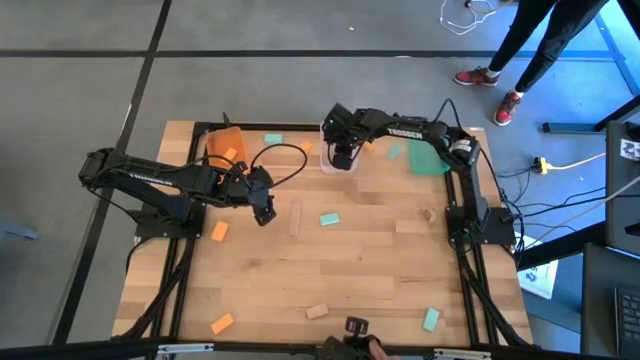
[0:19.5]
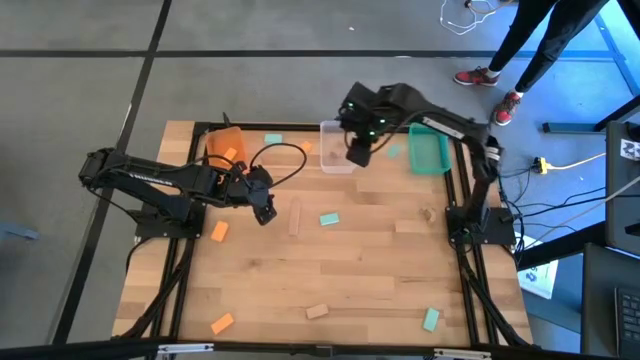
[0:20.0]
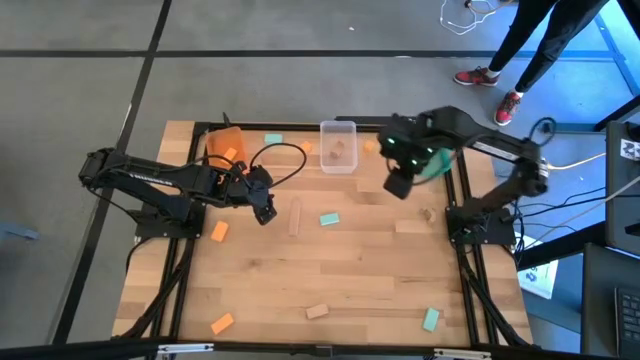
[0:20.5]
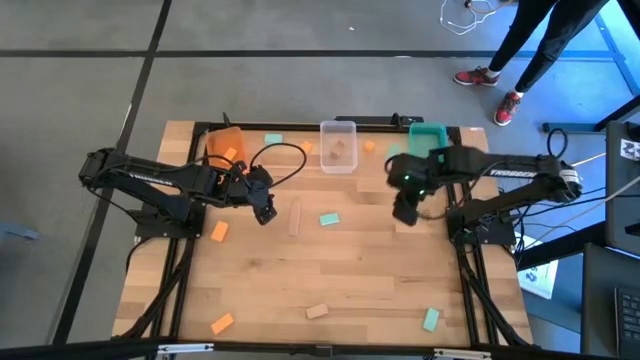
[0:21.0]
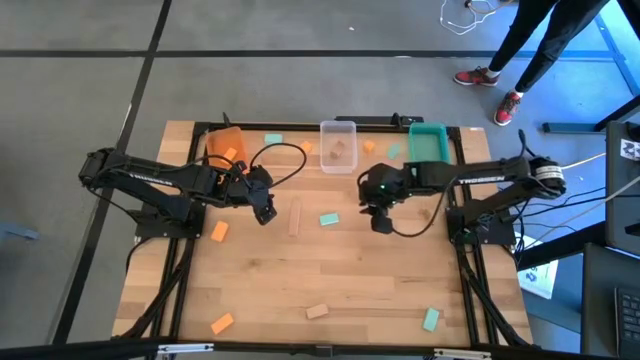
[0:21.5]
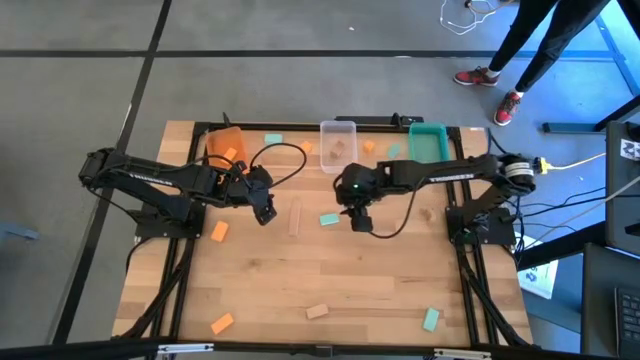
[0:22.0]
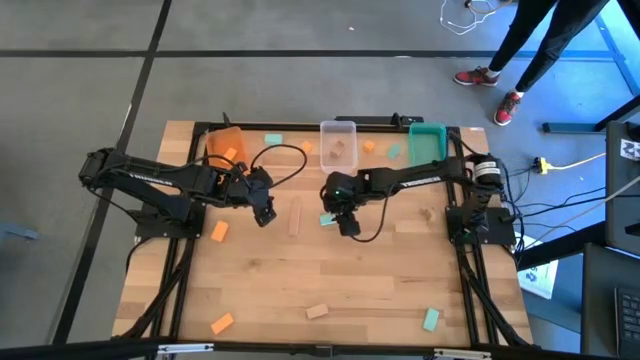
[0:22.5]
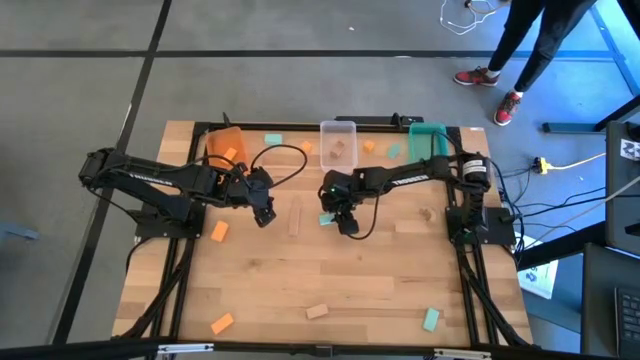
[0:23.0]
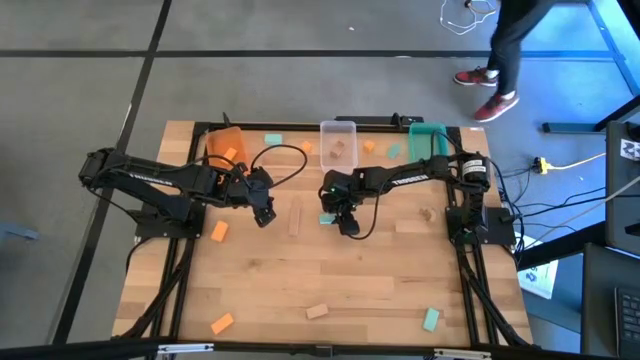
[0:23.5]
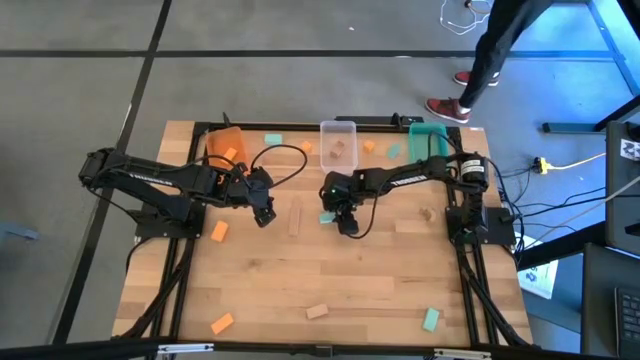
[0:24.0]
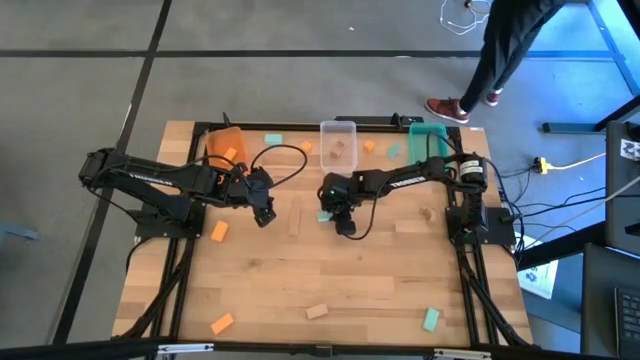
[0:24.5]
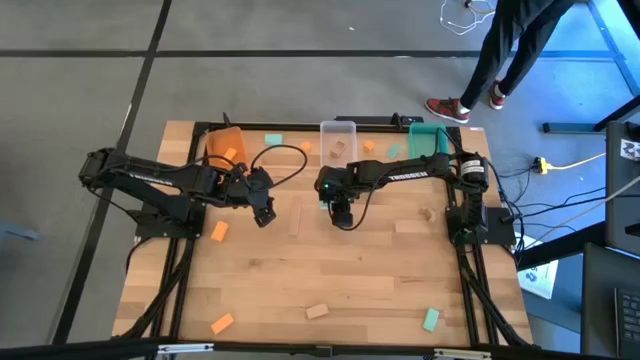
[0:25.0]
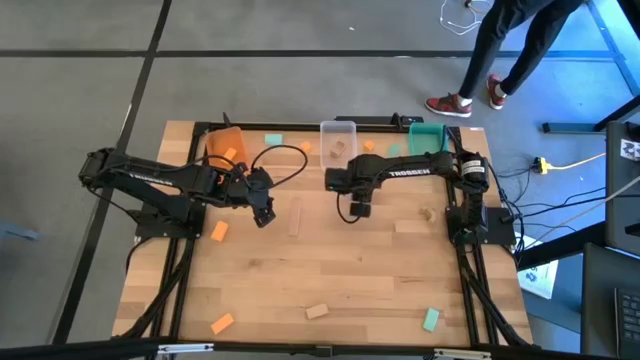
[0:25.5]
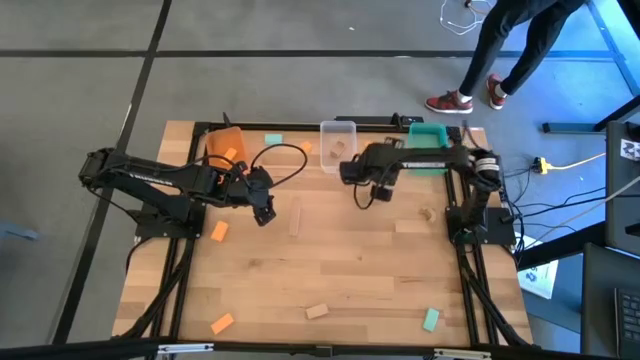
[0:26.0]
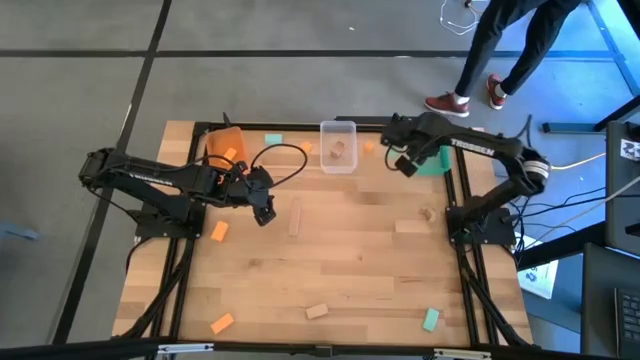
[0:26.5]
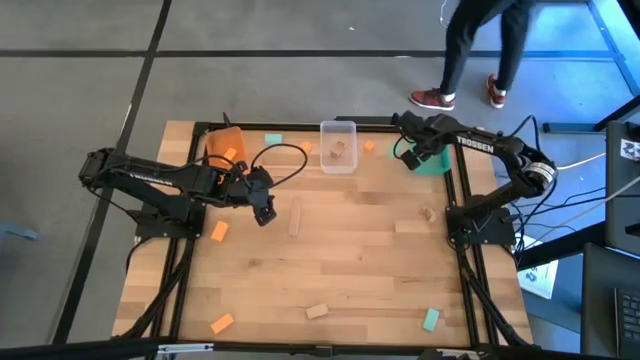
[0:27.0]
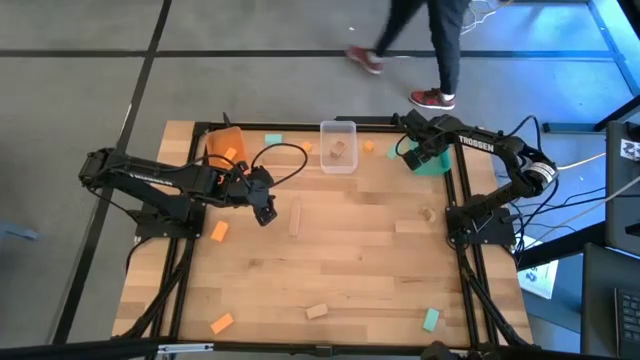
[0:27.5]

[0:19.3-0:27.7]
Task: Sort & place blocks by color
Put the green block into the green bin

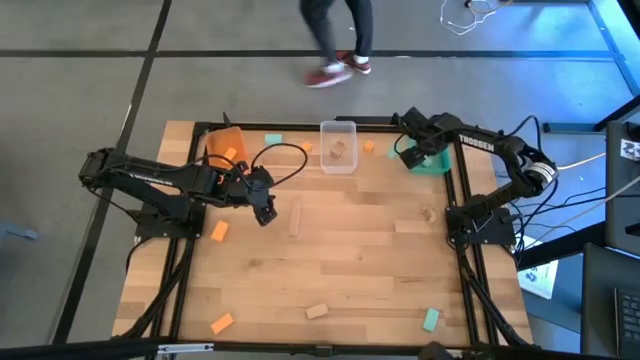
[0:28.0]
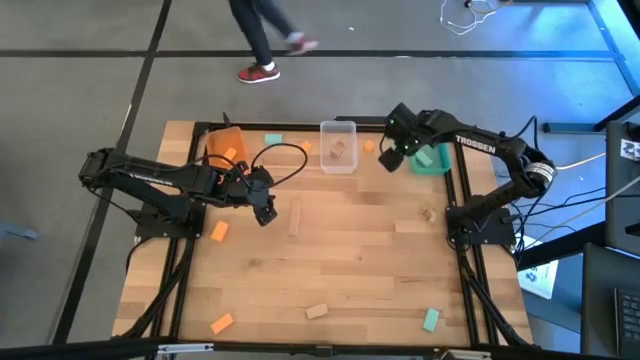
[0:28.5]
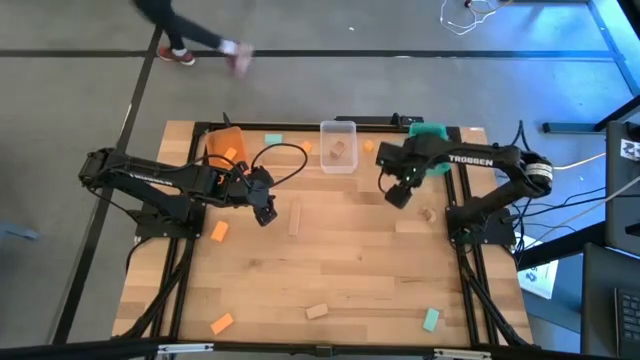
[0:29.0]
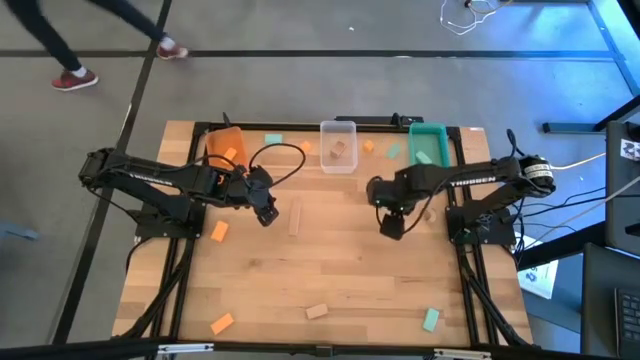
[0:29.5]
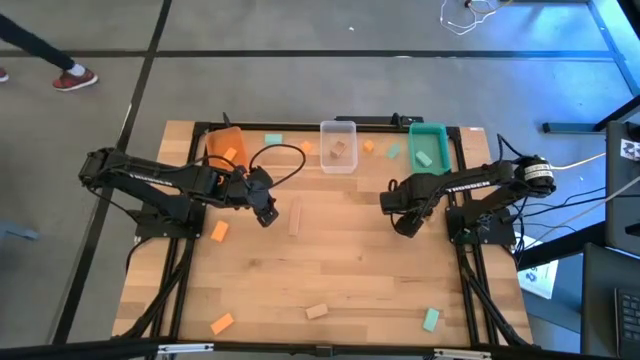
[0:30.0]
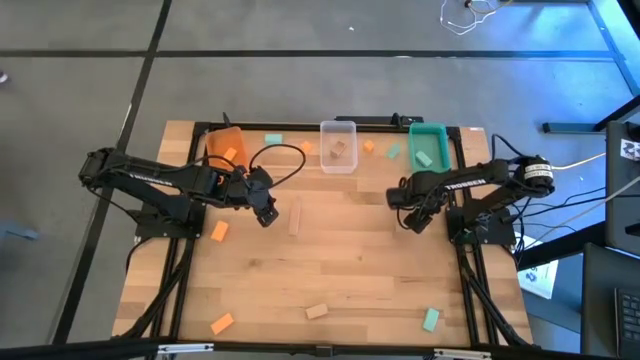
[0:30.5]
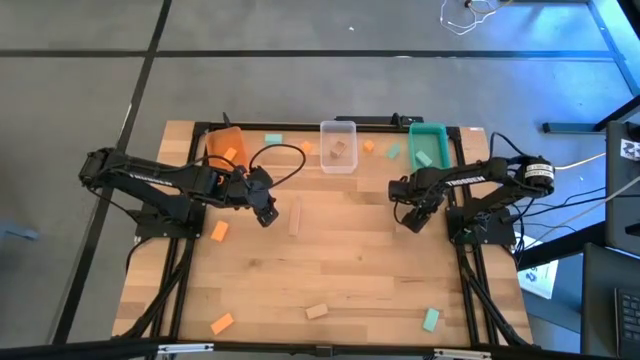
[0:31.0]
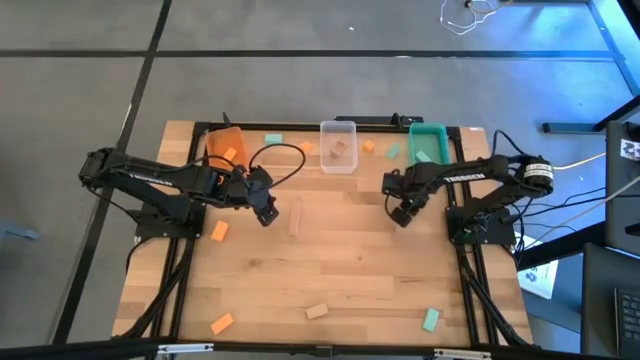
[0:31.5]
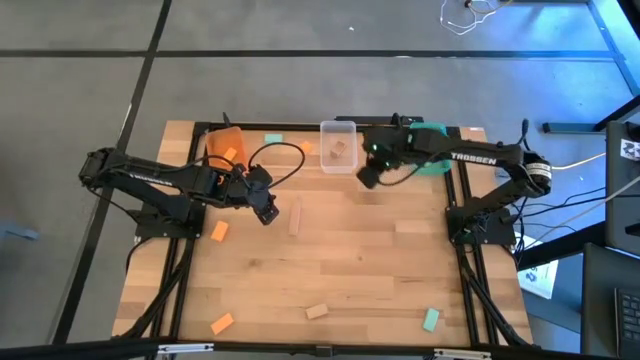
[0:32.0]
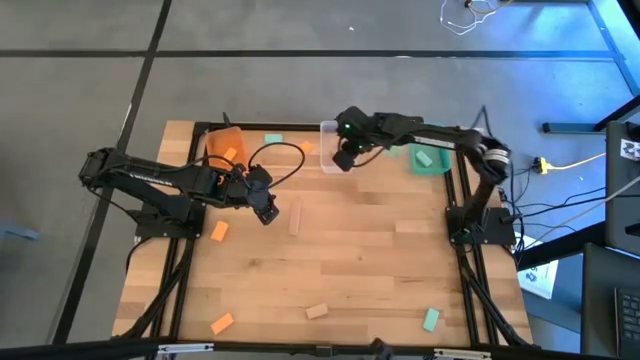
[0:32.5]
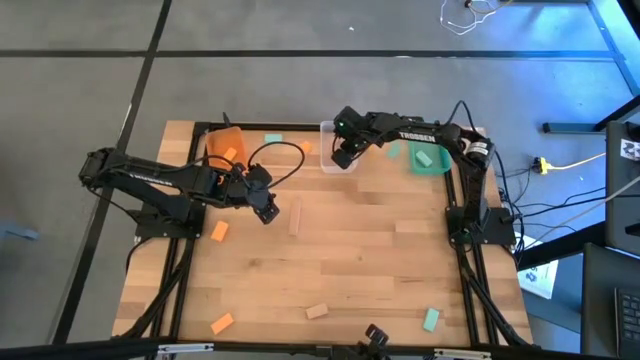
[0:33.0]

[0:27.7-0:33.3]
Put the brown block into the transparent bin

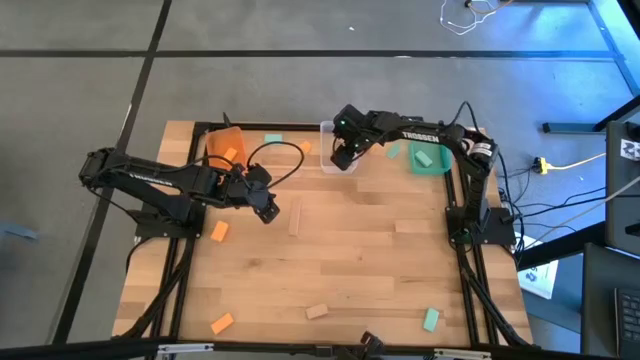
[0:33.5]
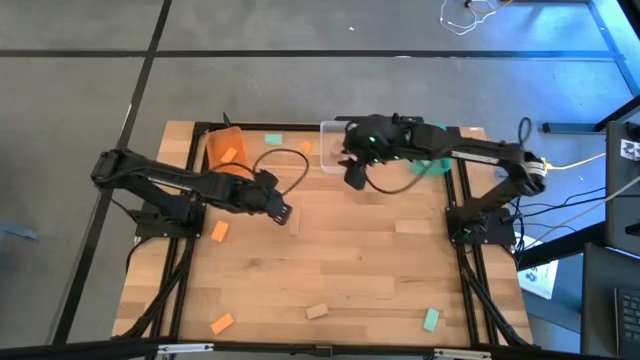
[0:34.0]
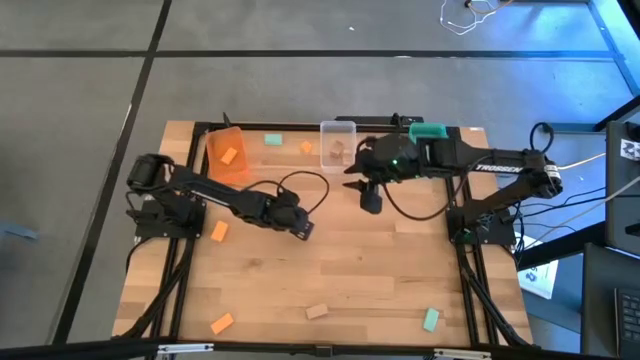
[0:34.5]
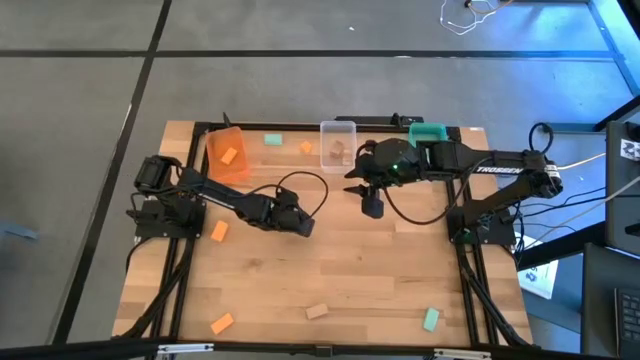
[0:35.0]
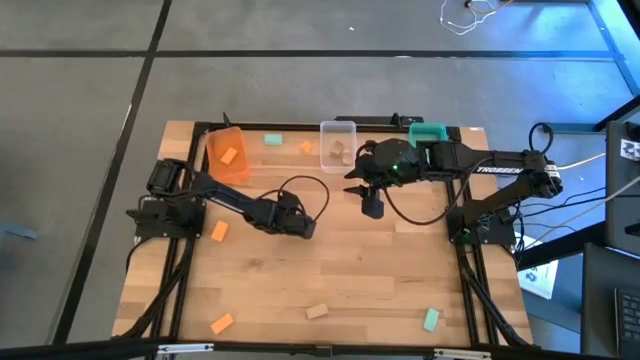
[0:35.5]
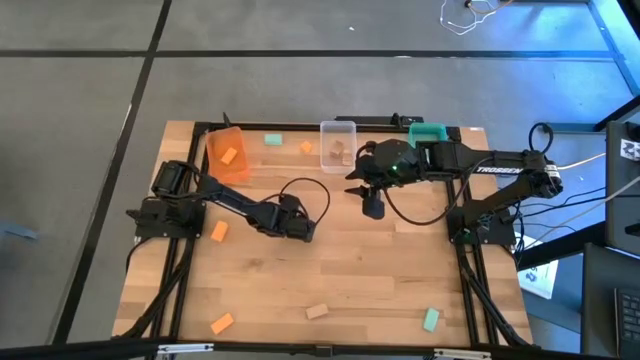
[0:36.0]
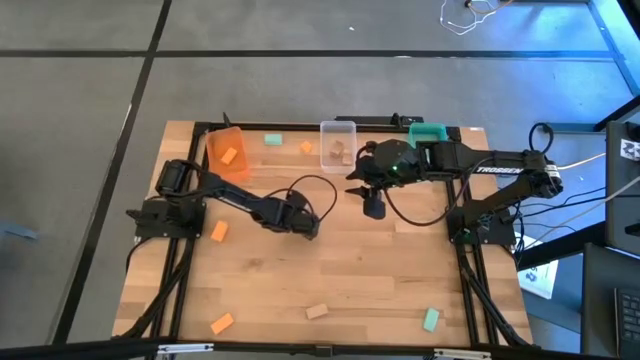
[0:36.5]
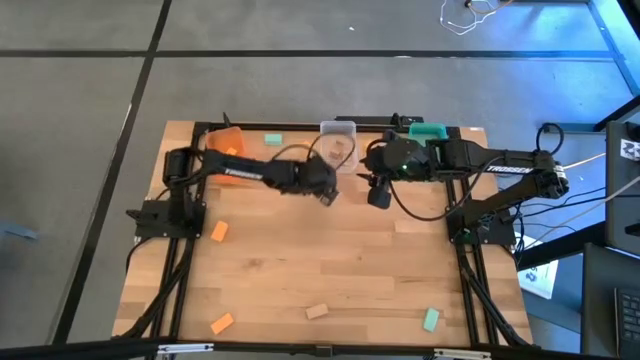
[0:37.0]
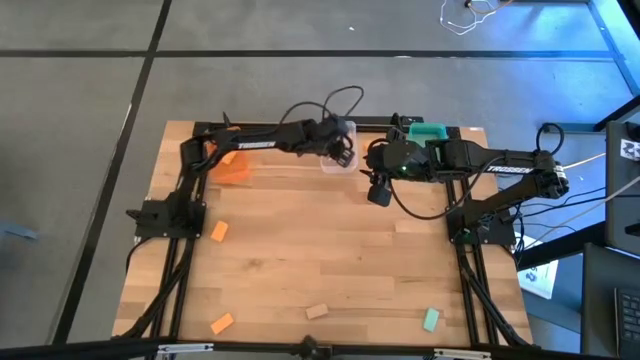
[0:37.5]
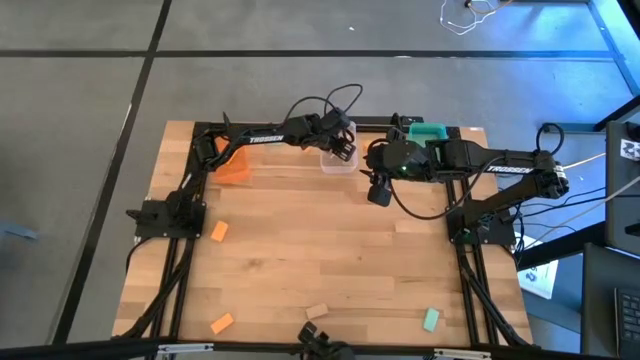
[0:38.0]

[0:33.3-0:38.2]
Put the brown block into the transparent bin

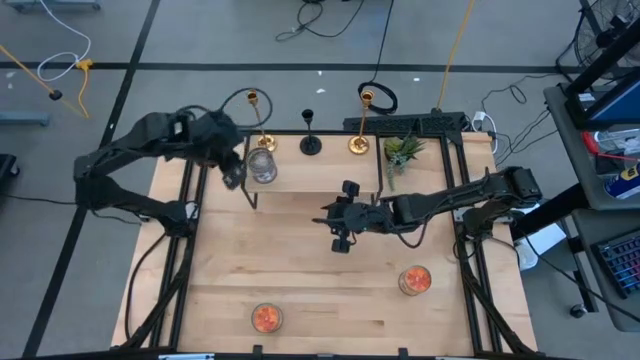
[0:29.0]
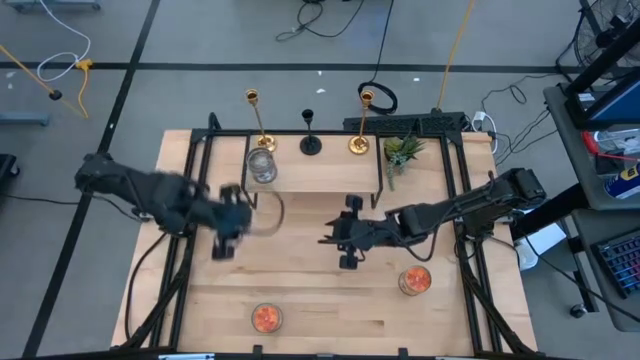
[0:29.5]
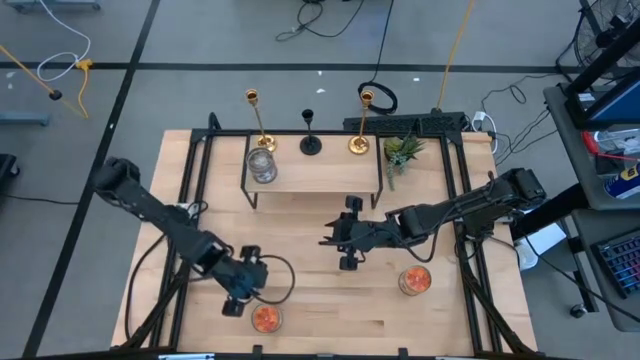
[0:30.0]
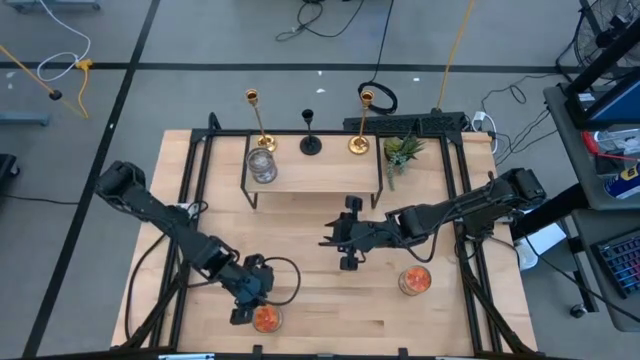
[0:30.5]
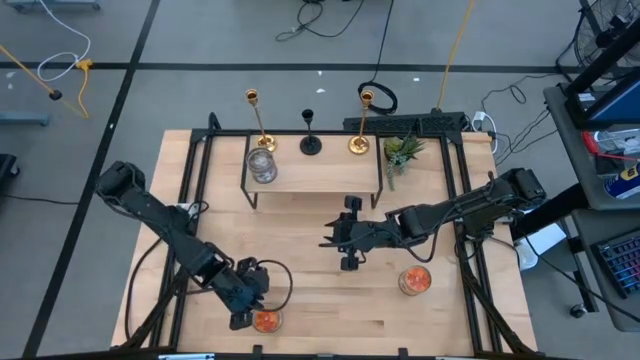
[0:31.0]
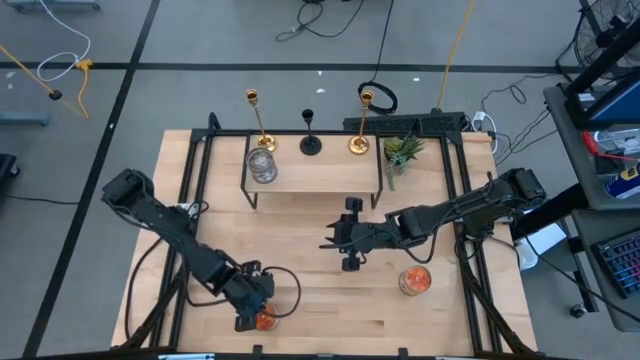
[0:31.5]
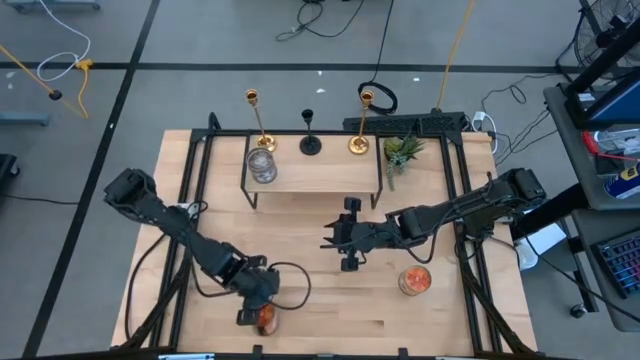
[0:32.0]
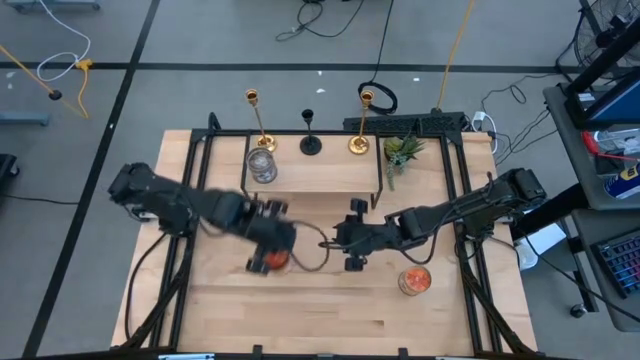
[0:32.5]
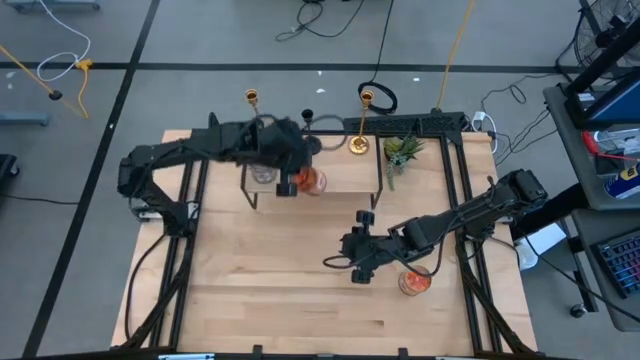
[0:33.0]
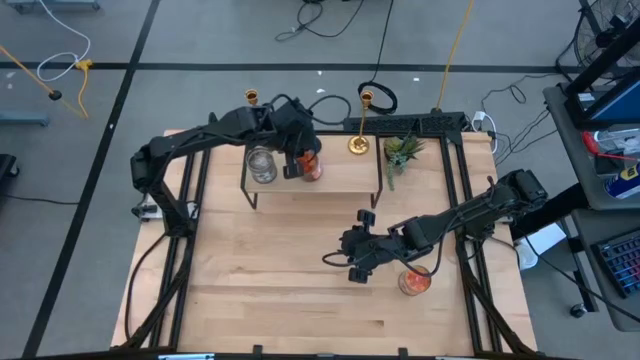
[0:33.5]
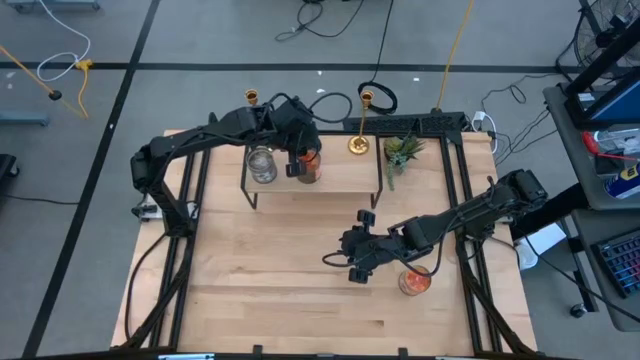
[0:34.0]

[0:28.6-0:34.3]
Task: Pick & Place candle stick holders
Put the left orange scented candle on the shelf
